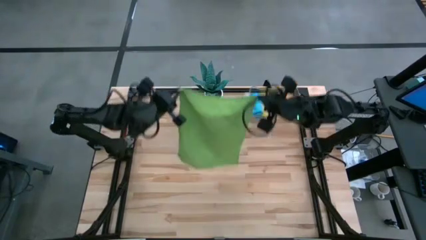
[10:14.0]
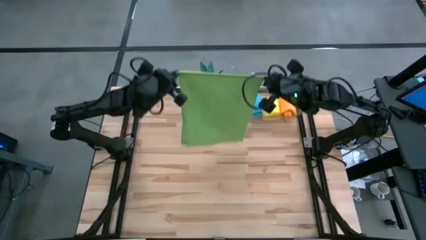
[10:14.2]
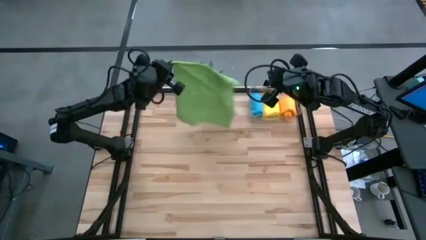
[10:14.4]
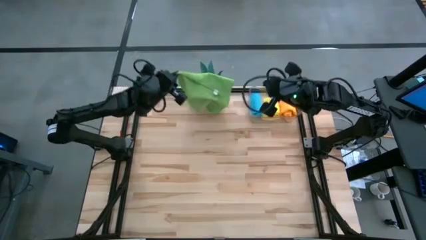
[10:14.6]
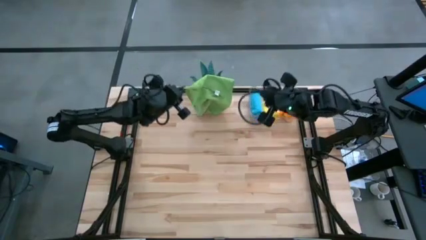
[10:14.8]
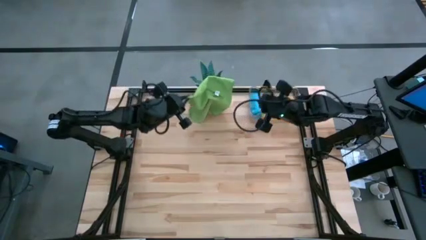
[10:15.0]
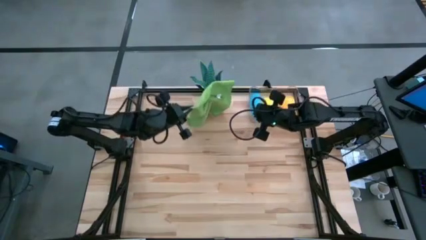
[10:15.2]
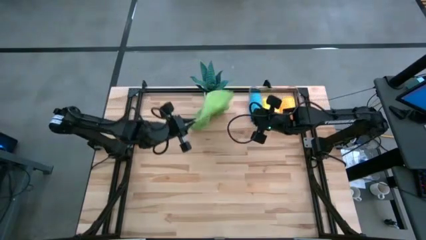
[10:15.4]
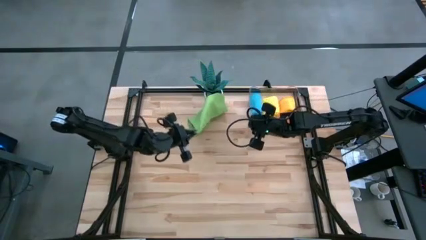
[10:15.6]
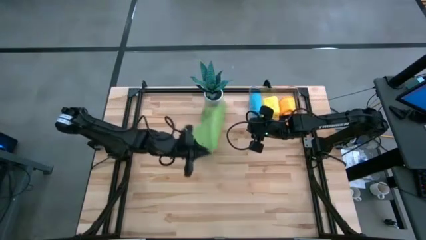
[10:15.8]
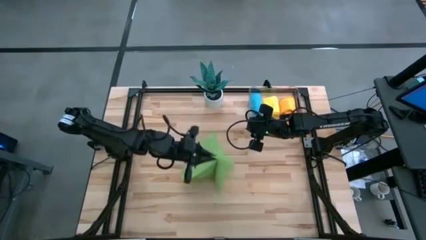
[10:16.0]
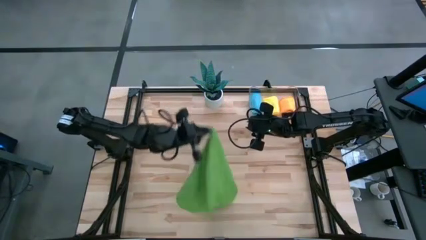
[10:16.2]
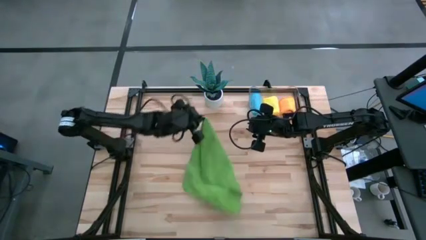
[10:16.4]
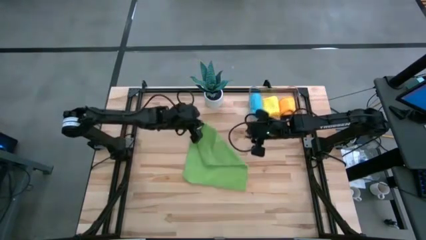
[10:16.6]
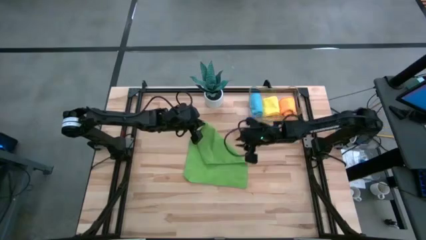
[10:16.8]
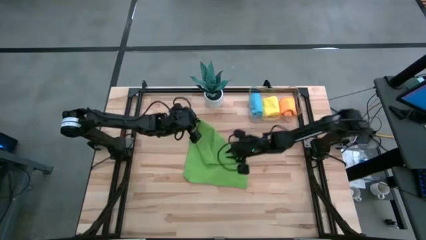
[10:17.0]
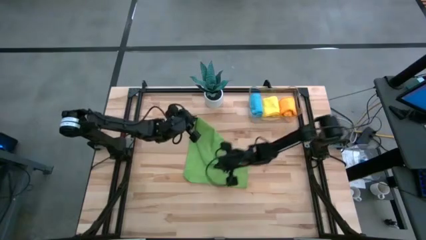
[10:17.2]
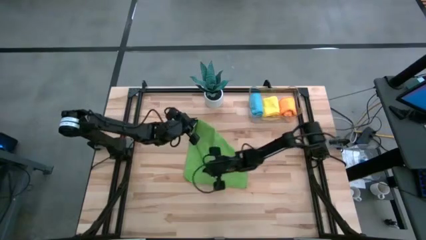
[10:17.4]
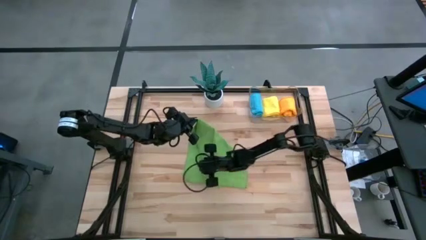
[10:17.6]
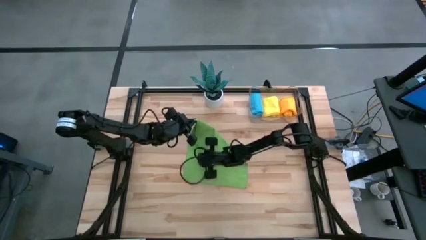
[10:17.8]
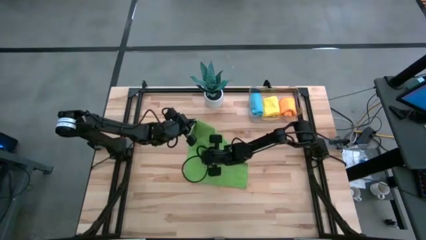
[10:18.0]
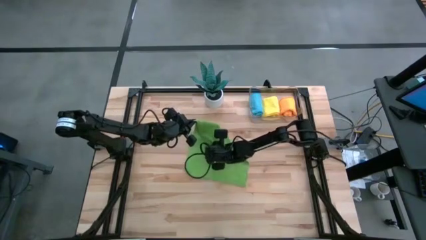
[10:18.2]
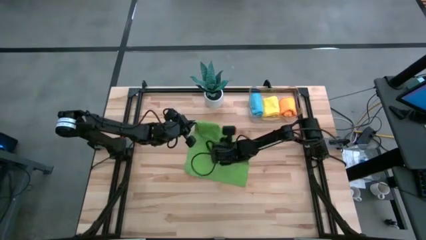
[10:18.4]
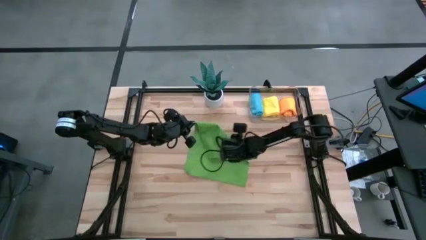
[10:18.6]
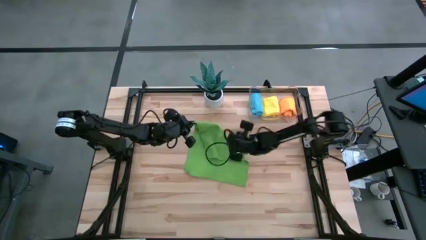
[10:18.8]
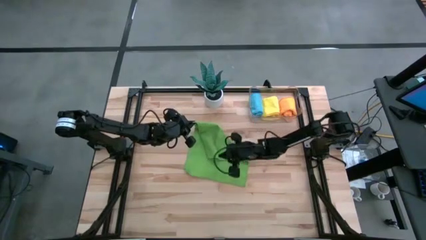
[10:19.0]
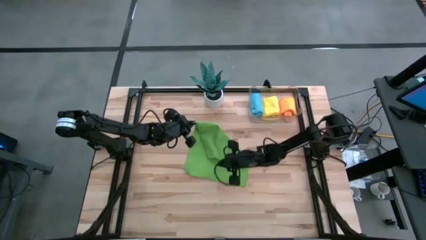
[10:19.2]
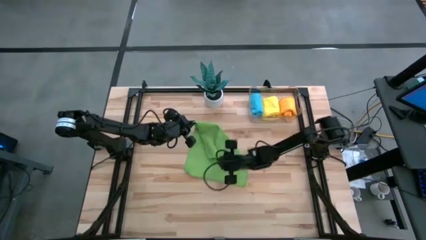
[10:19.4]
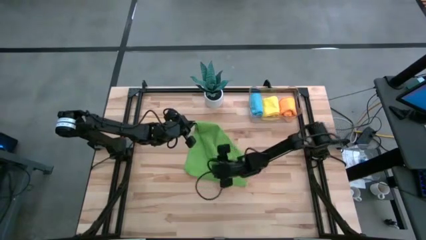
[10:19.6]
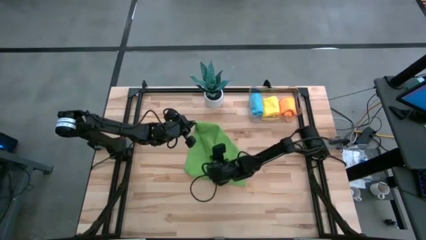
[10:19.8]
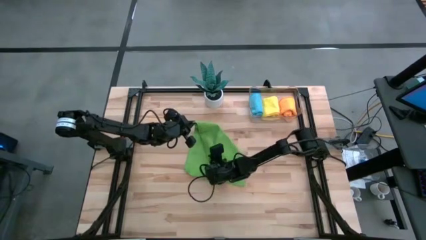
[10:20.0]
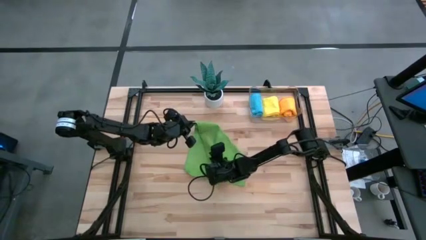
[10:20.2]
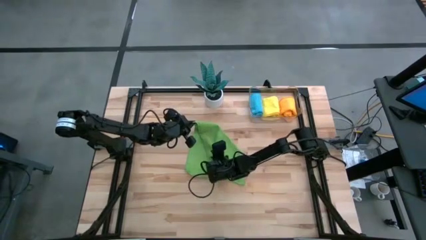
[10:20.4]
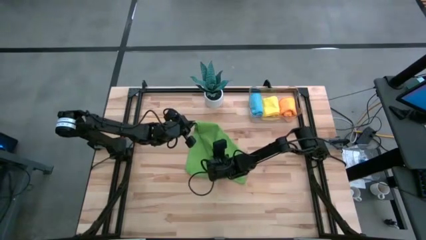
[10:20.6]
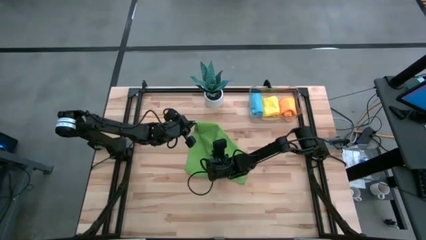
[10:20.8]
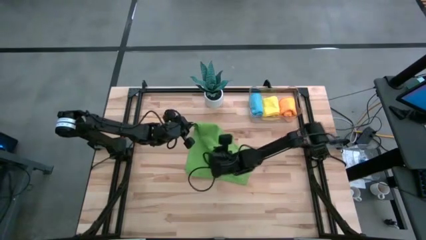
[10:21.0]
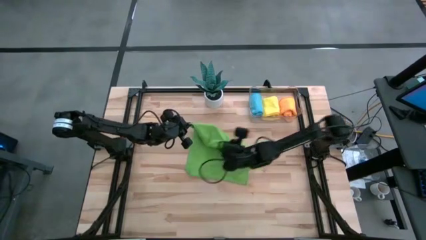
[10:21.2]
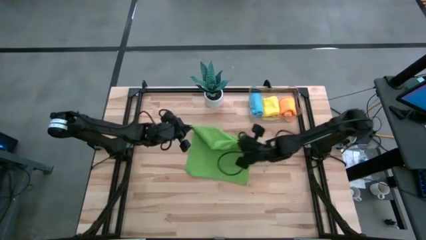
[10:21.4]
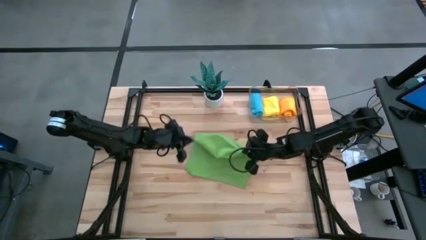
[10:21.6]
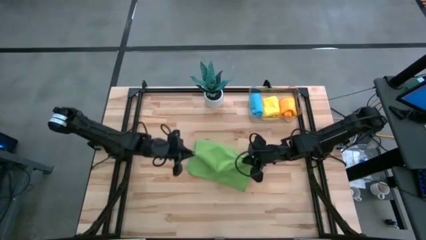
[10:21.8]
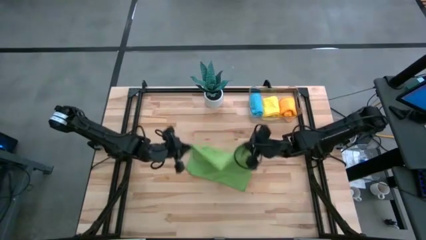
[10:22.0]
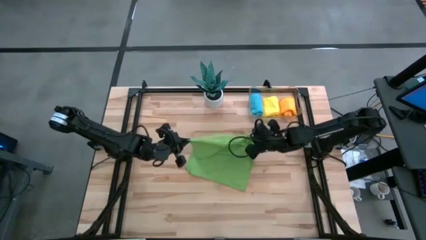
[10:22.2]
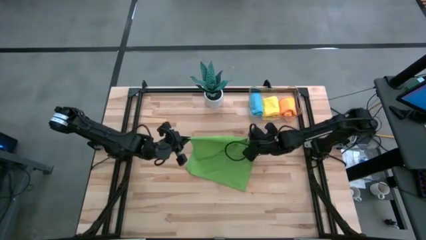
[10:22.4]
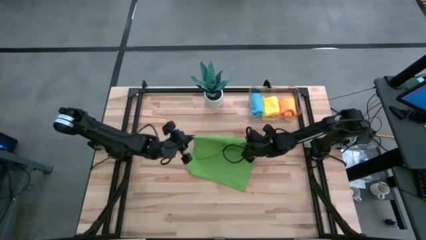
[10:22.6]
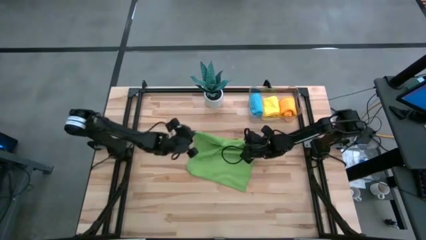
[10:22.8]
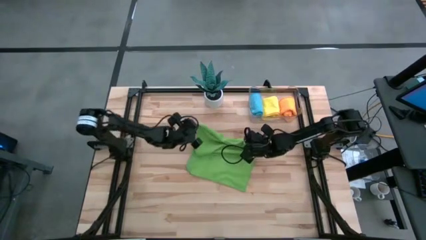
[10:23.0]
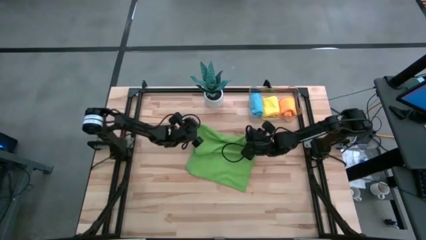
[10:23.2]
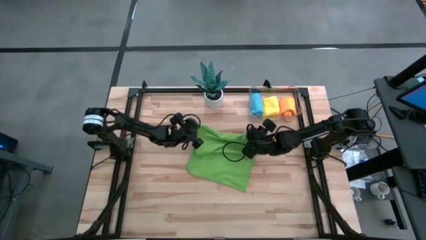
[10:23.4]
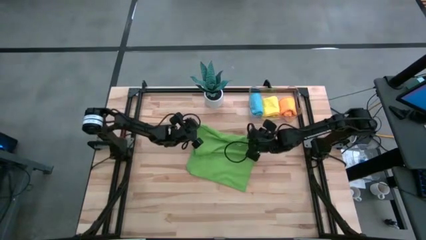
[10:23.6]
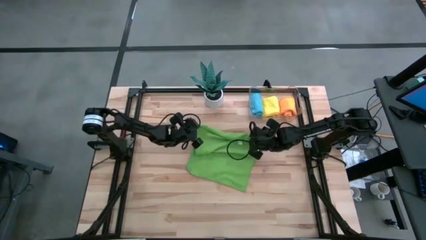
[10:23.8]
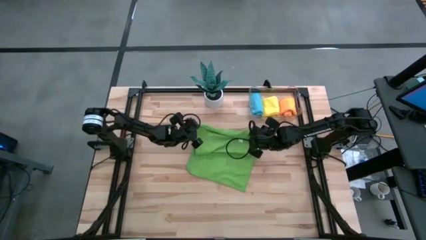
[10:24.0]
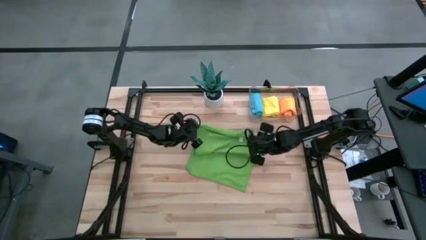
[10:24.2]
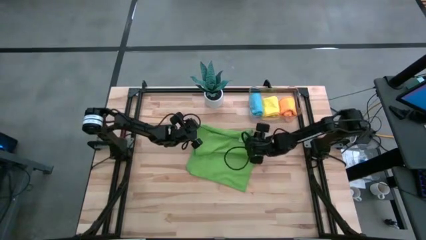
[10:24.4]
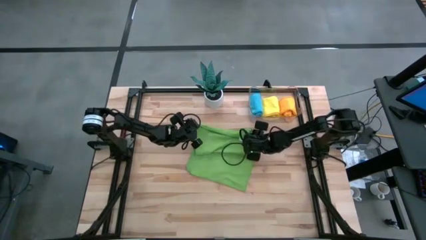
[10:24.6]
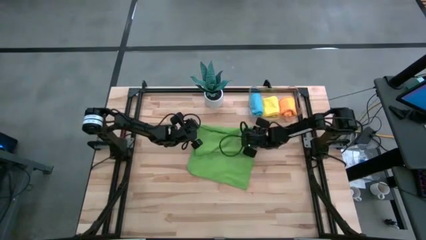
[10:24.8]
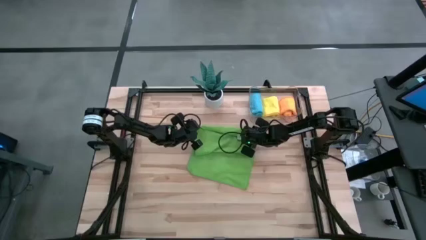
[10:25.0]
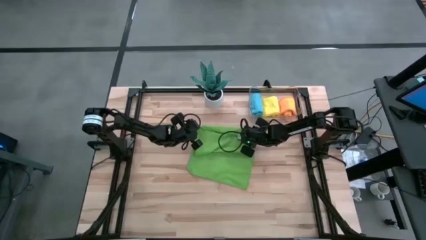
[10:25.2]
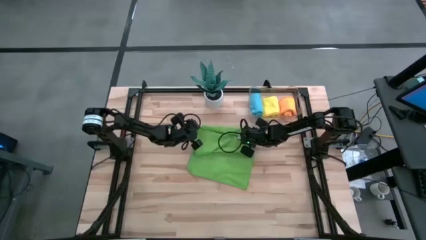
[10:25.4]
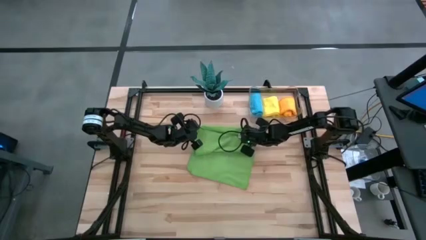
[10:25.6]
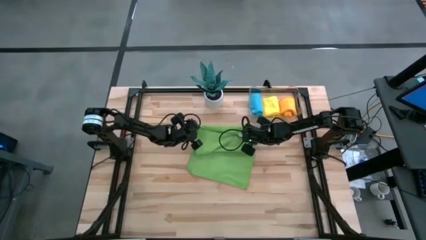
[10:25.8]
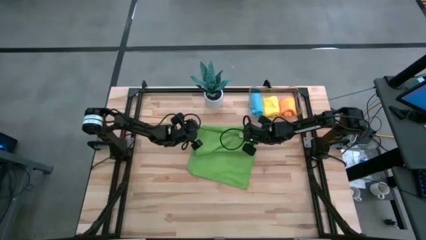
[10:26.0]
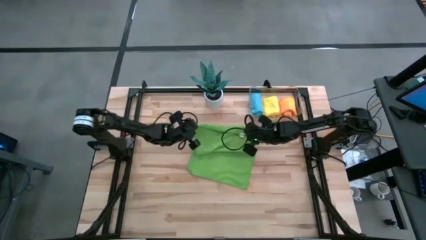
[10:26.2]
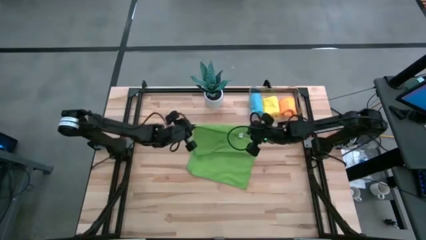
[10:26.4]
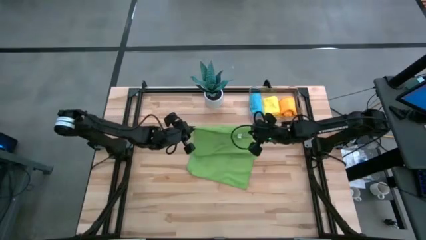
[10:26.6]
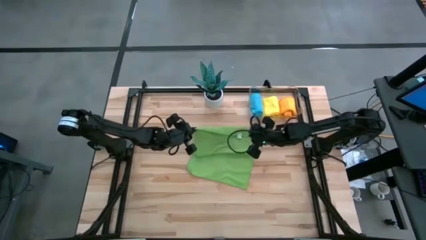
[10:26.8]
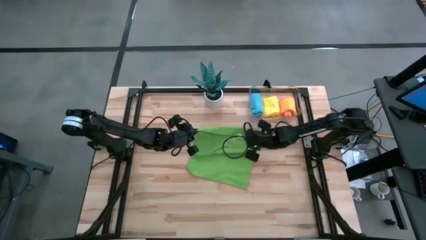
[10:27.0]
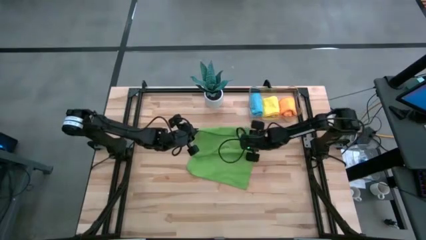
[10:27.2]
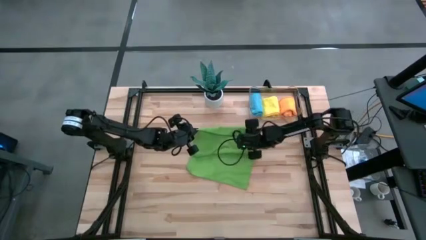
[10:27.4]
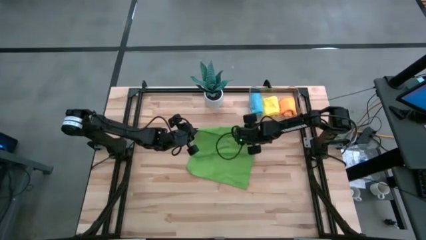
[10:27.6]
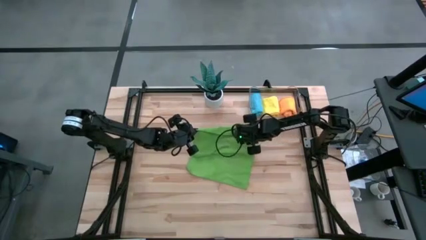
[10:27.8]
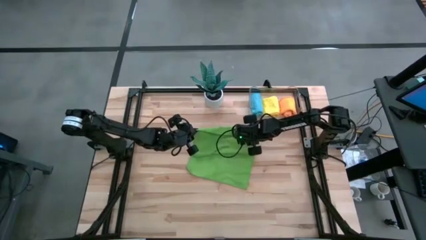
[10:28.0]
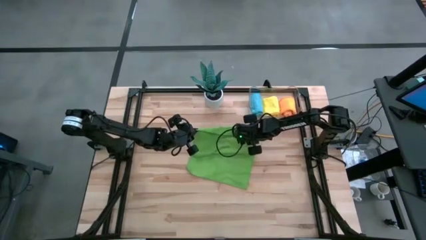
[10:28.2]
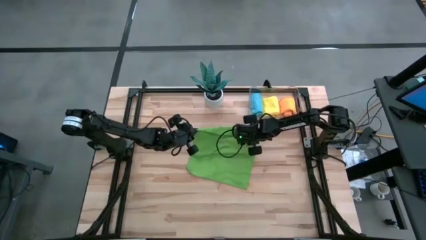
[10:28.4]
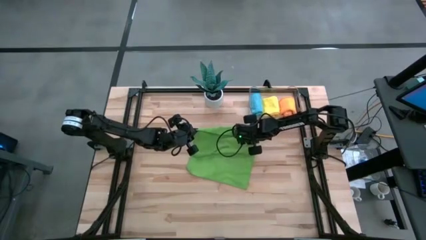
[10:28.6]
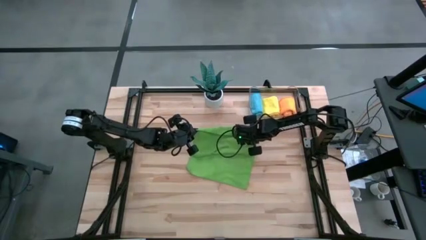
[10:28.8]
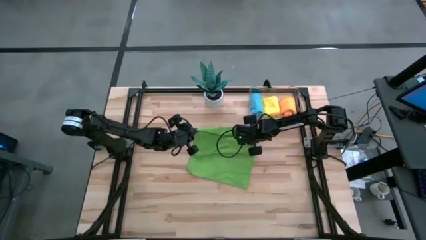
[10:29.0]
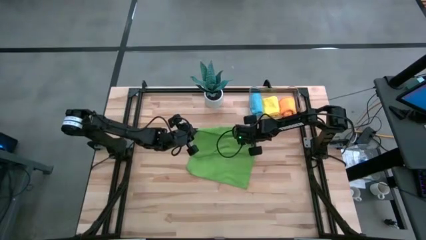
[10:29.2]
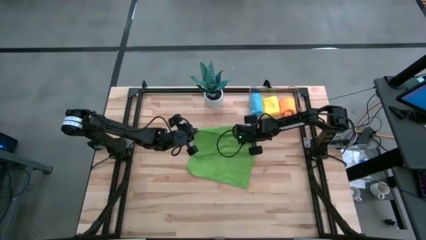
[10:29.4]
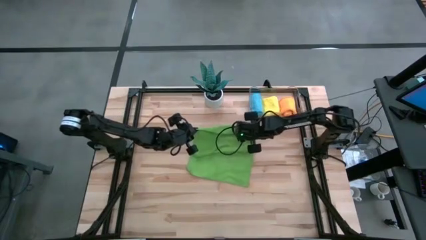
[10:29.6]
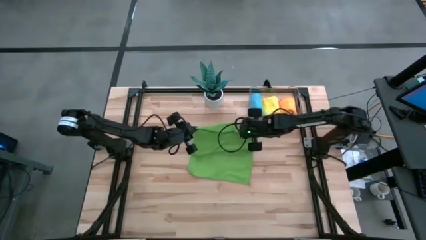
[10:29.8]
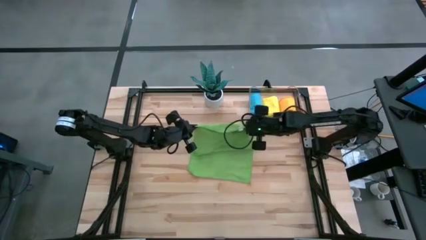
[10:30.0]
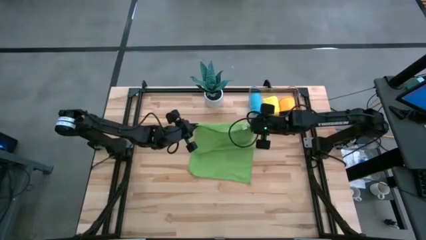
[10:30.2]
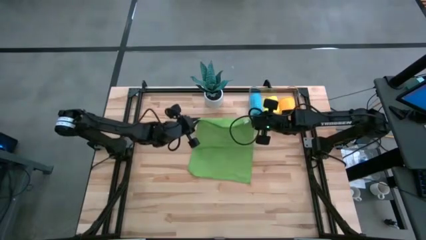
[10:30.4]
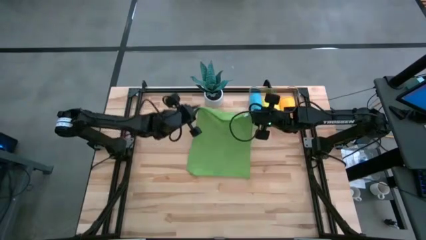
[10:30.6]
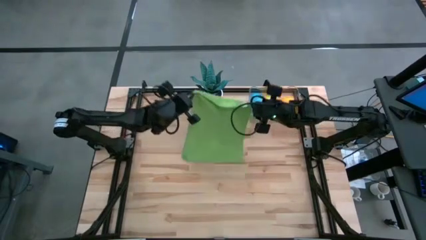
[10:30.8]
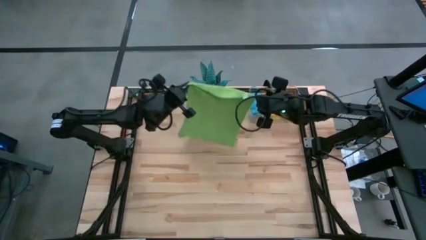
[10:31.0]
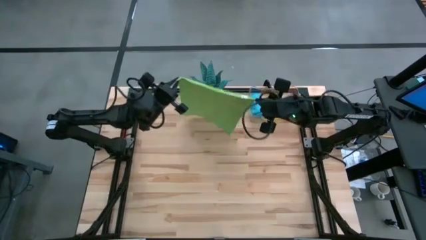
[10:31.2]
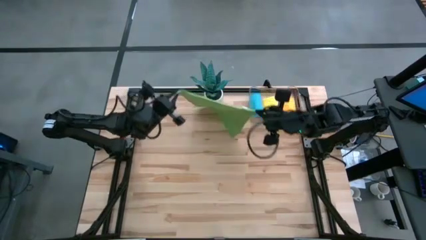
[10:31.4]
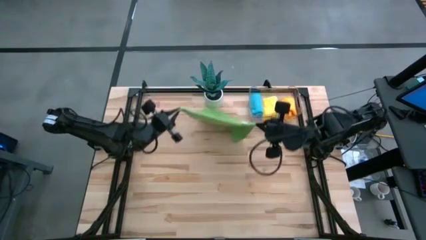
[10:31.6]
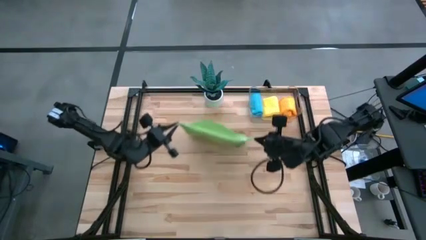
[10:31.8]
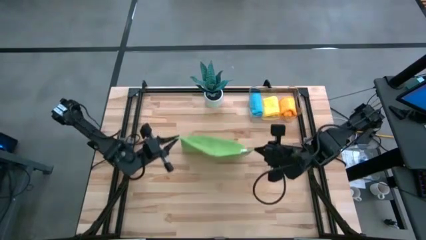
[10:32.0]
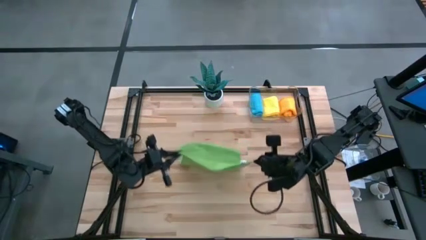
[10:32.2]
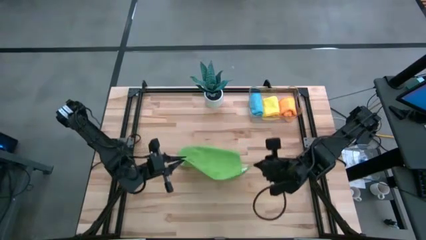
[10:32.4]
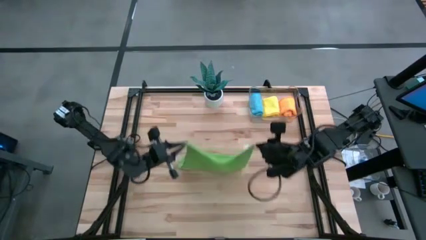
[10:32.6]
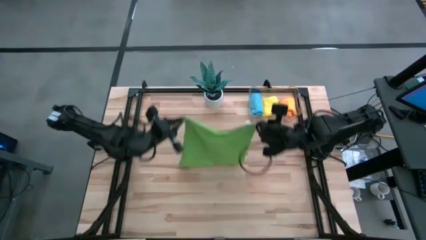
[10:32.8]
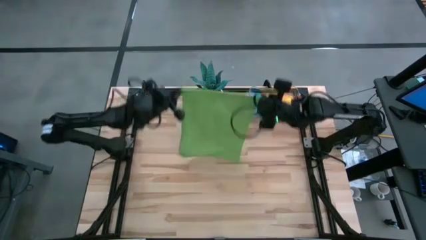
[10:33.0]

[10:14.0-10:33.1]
Task: Roll microfiber towels into tight, uniform cylinder then place into a basket
Fold the green microfiber cloth
